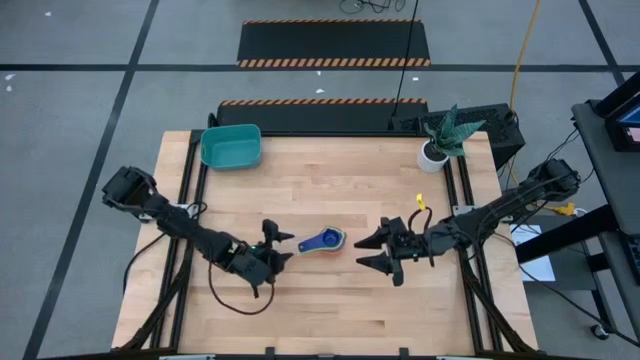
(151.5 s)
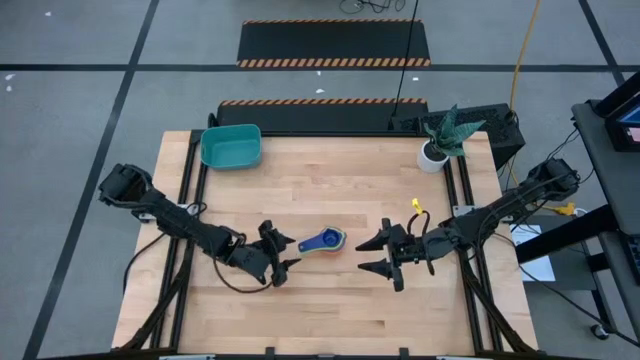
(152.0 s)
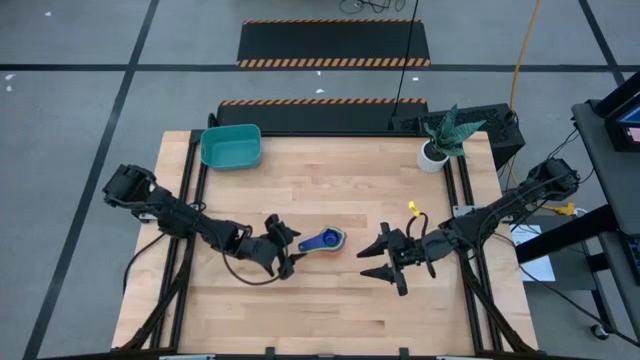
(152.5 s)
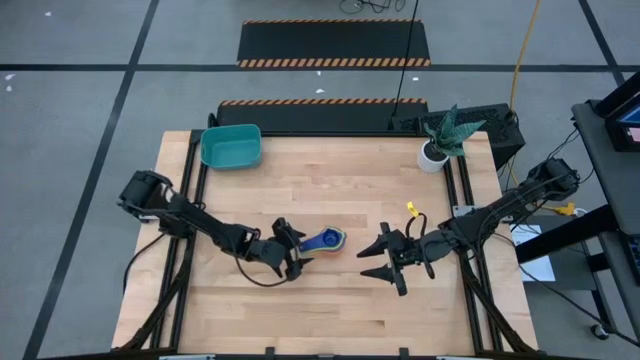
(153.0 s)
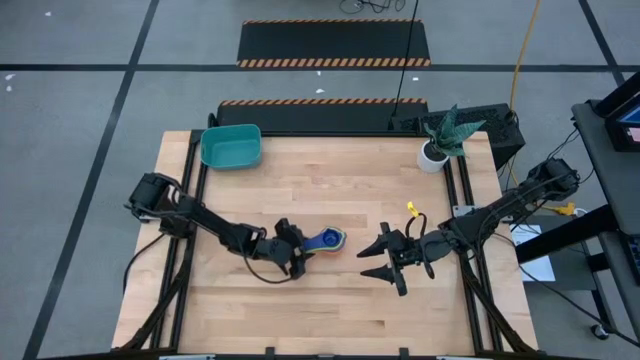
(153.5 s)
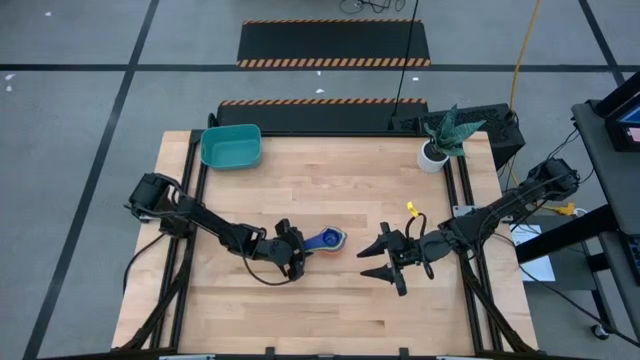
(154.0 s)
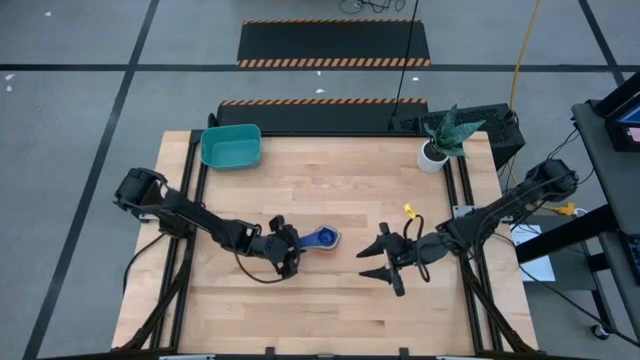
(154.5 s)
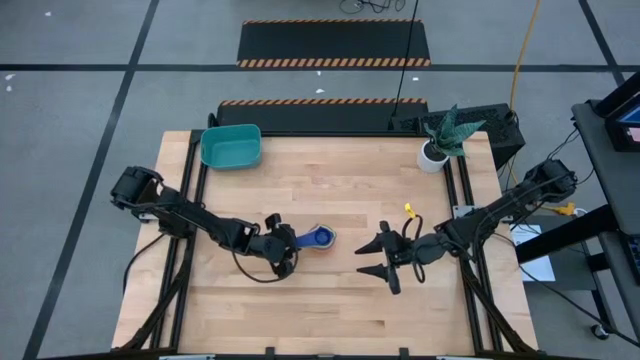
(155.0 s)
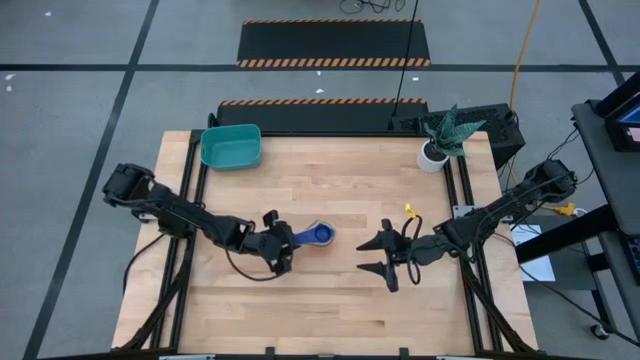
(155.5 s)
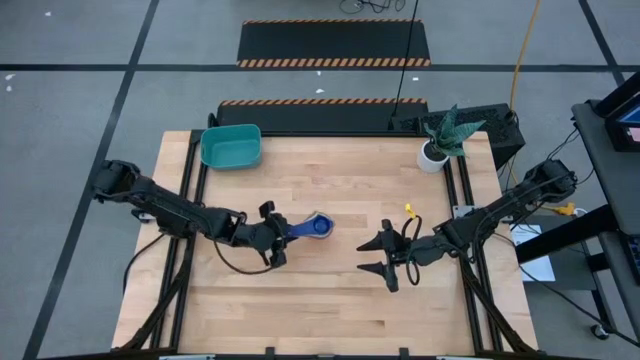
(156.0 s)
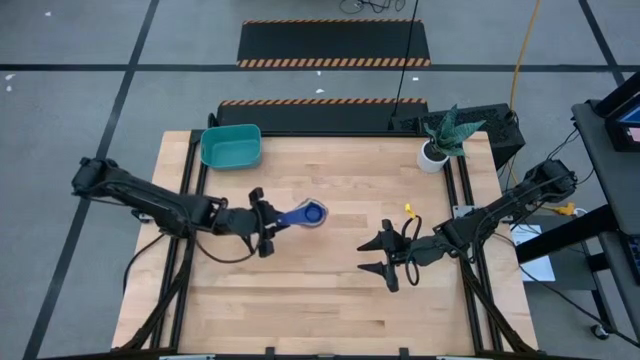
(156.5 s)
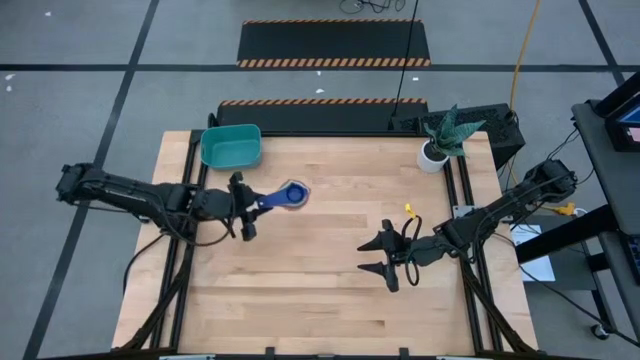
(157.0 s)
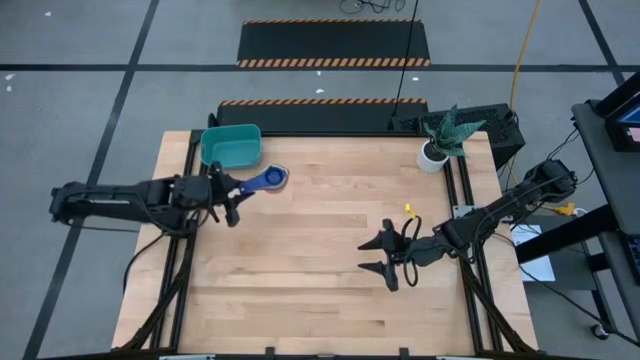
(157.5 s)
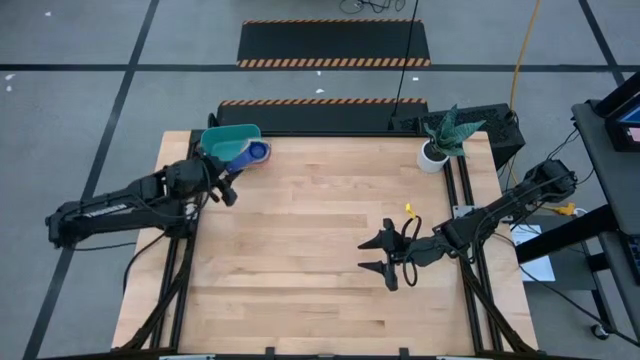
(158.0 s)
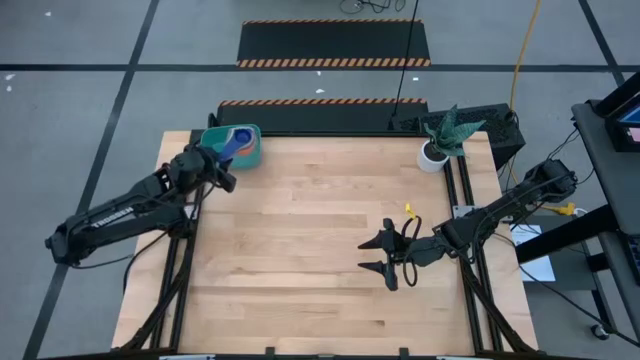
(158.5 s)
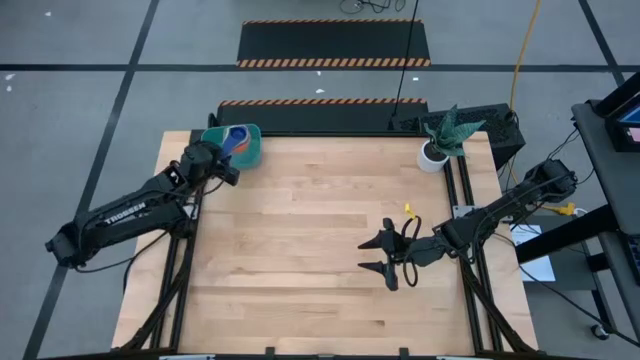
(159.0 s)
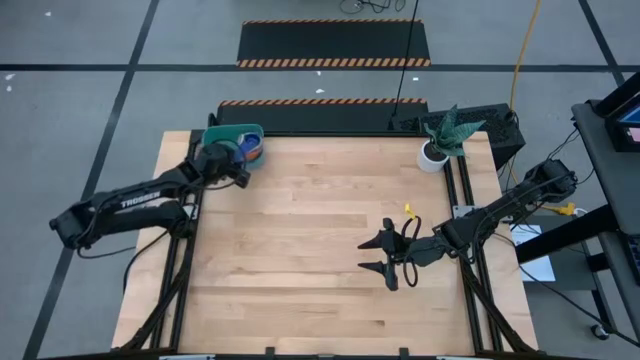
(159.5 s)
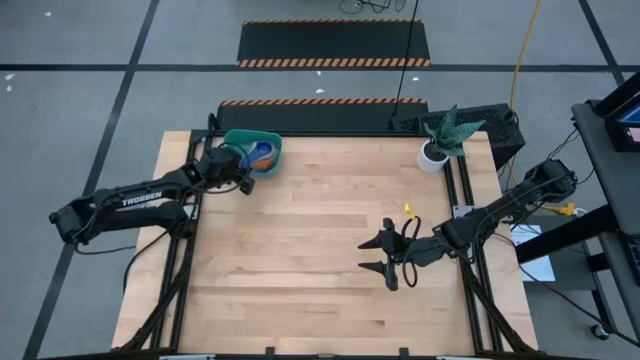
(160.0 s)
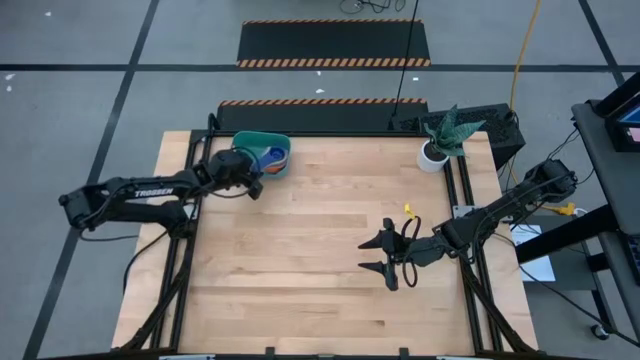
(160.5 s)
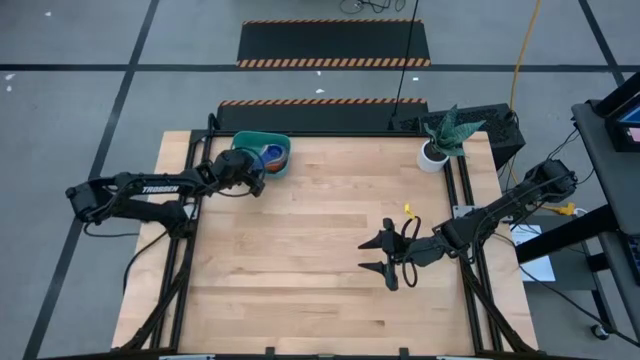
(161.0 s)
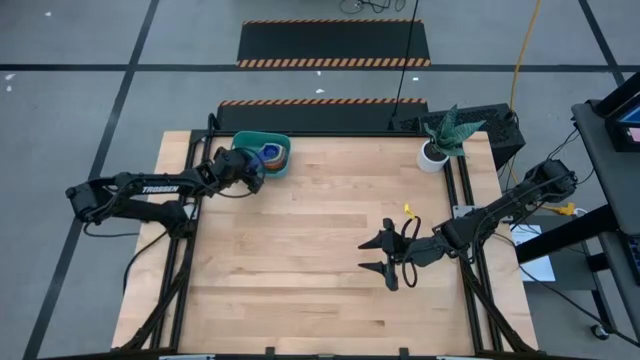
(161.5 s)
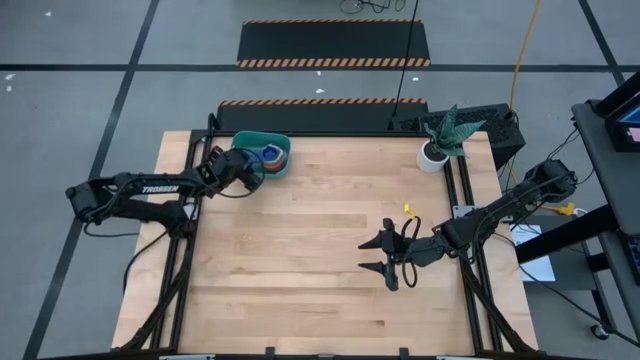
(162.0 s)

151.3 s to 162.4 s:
Task: Nest measuring cups in basket
Put the nested measuring cups into the green bin

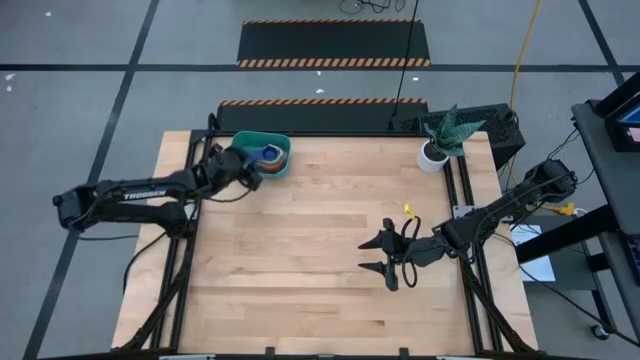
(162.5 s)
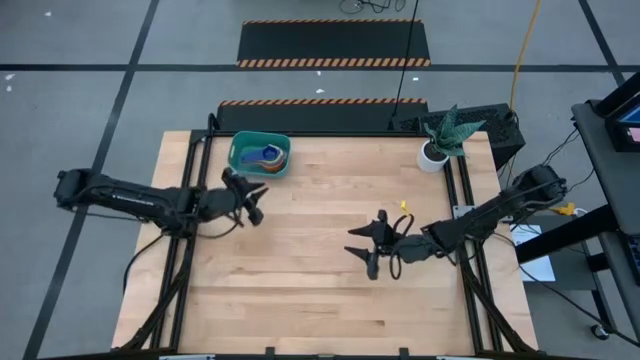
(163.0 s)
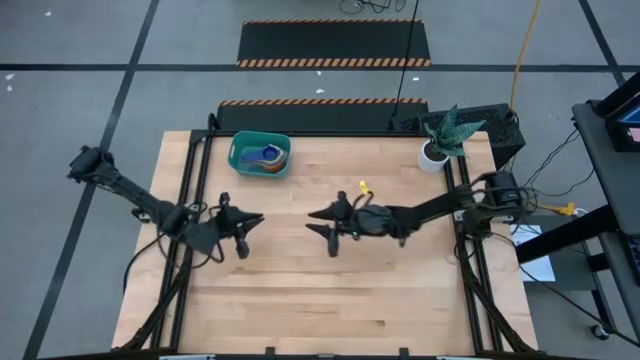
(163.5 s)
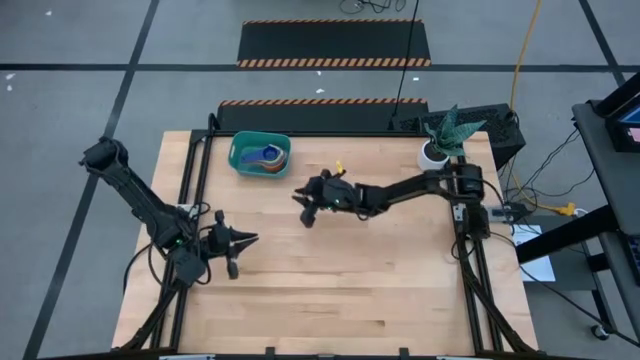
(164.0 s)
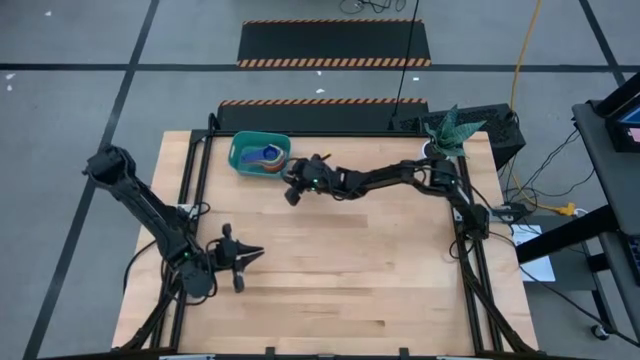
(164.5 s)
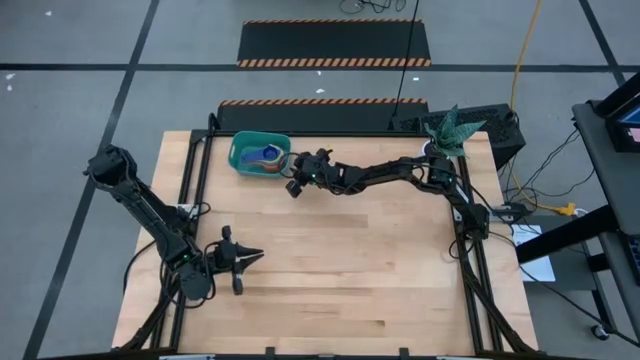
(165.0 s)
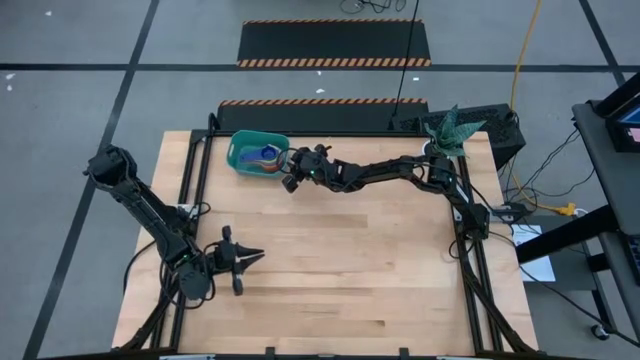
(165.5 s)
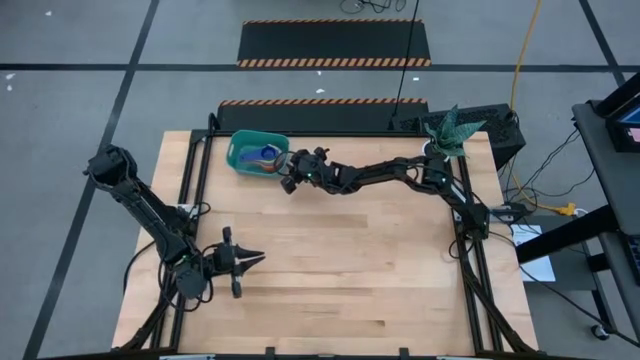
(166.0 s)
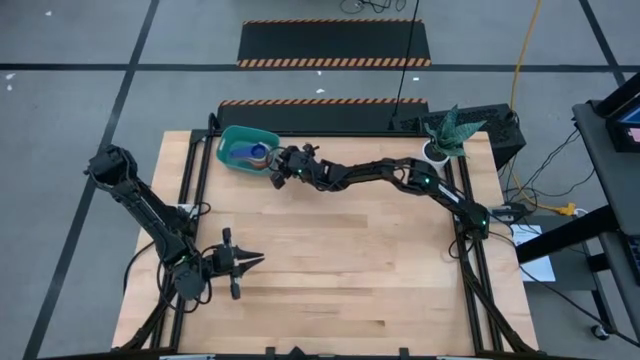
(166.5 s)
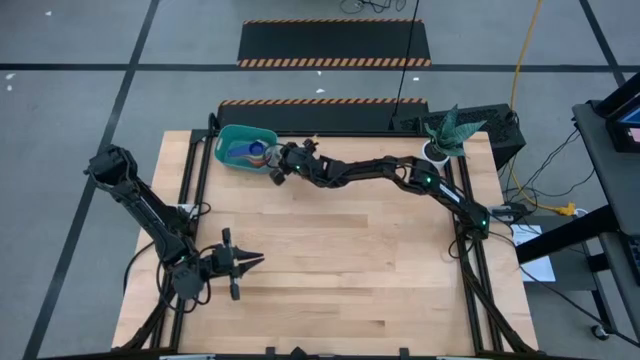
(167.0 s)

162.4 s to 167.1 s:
Adjust the green bin

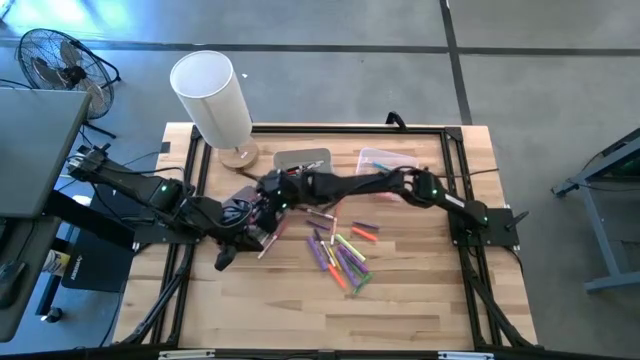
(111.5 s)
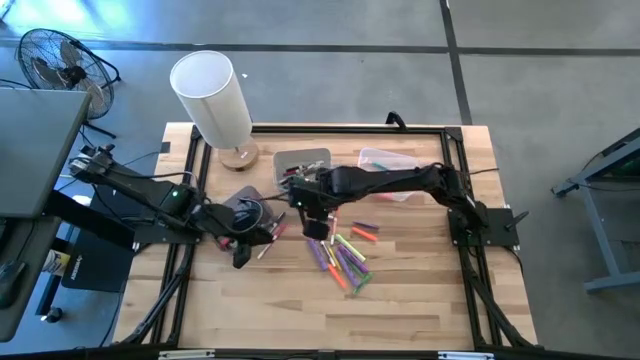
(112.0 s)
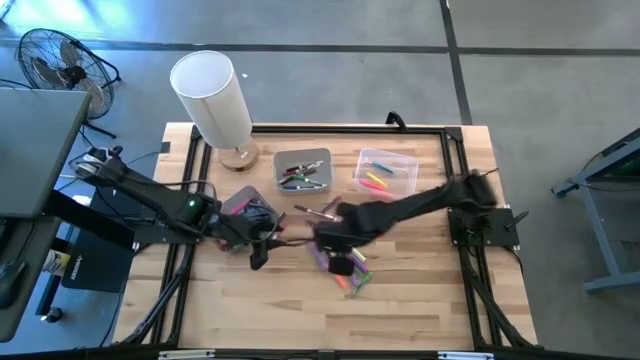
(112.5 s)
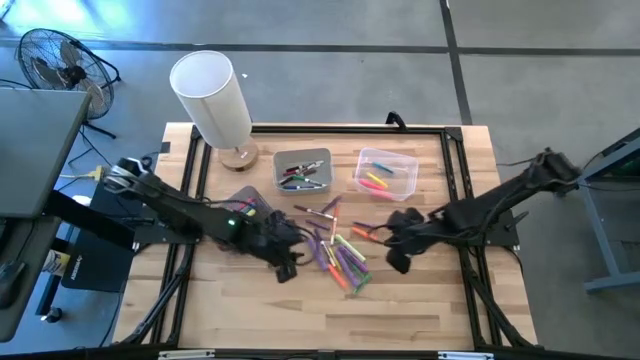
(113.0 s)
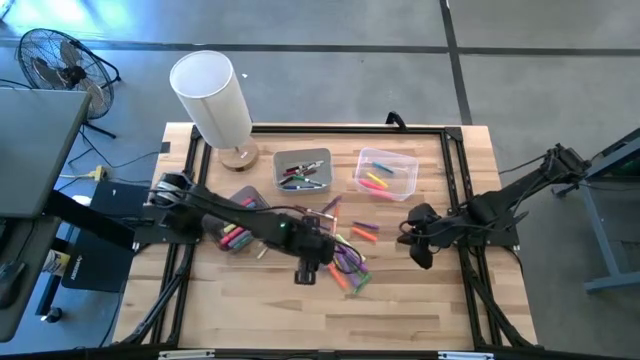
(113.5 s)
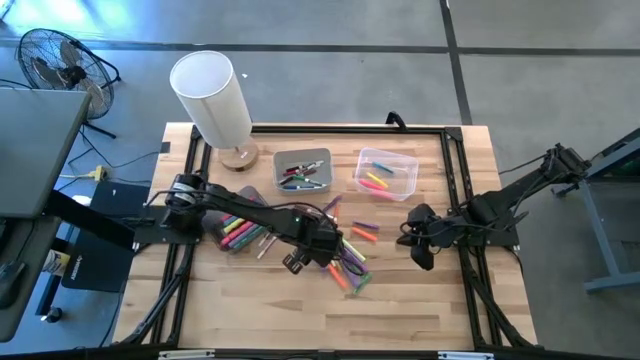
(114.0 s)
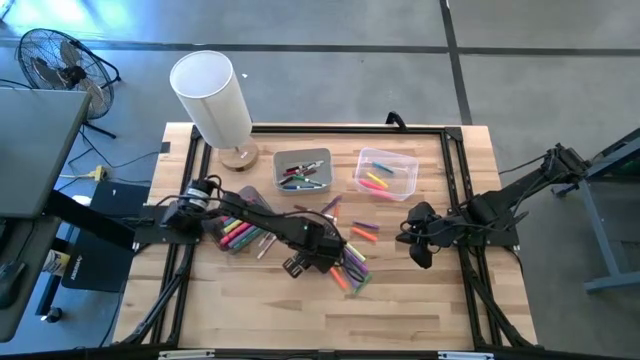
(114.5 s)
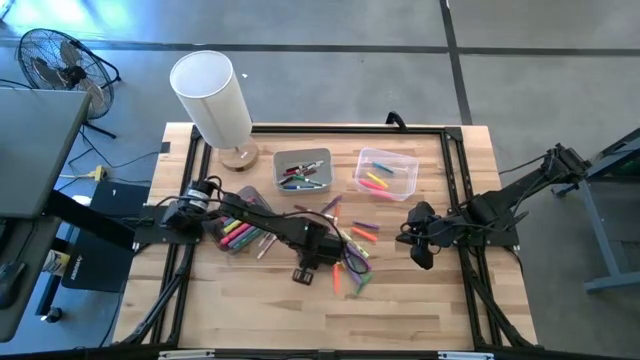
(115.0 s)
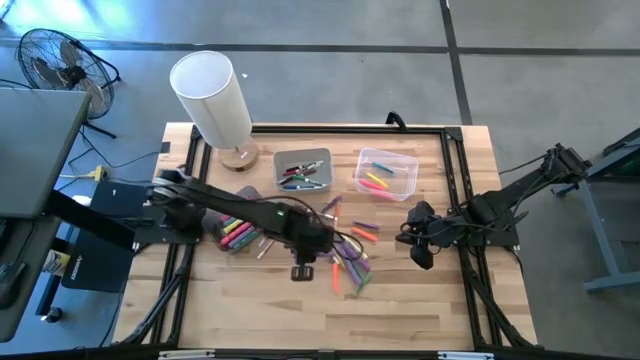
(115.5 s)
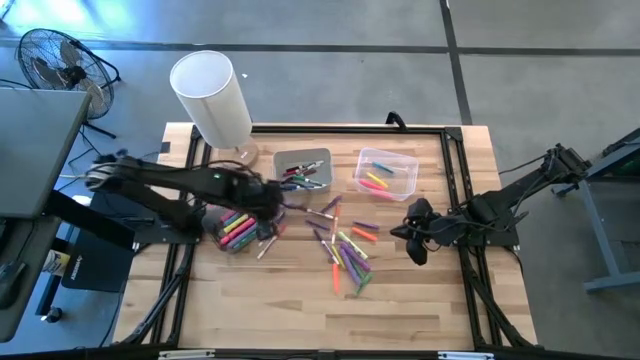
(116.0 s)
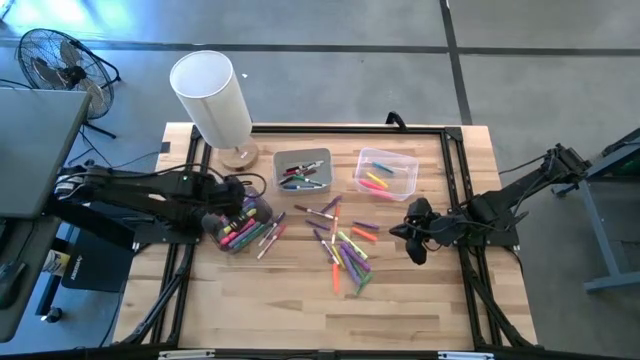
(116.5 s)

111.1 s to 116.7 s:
Task: Pick & Place Markers
Put the purple highlighter pen into the black bin

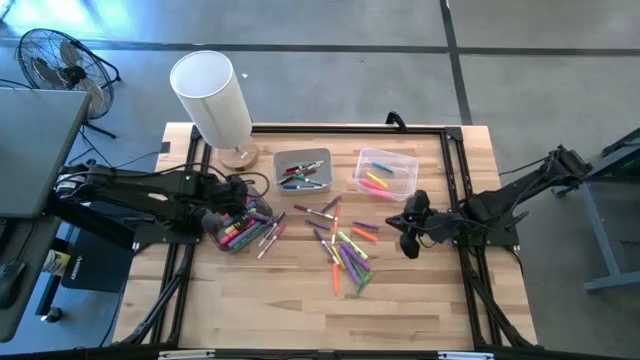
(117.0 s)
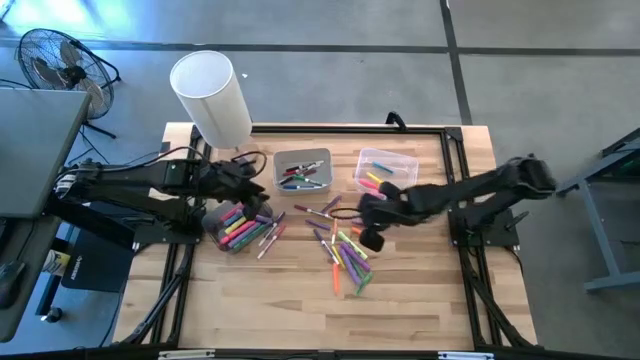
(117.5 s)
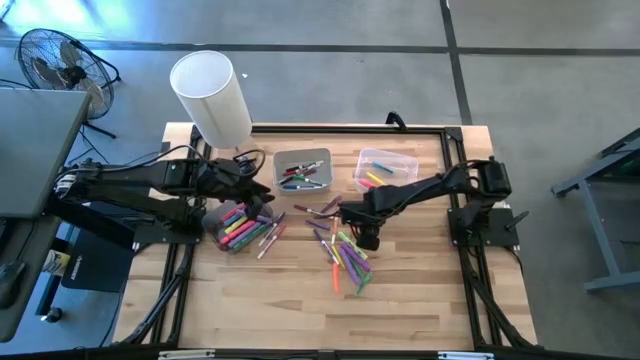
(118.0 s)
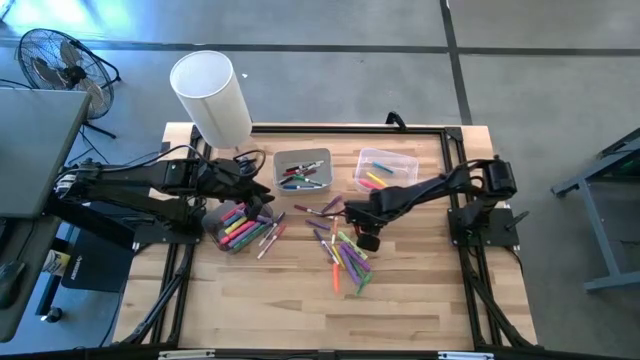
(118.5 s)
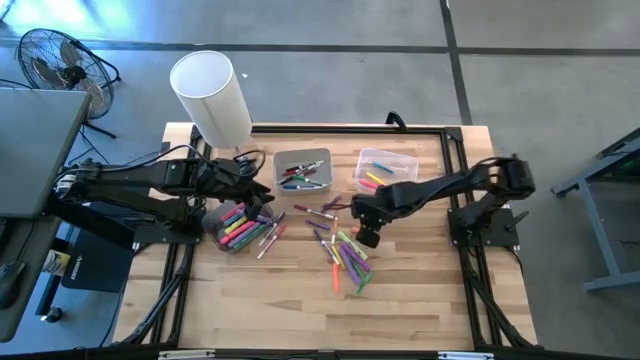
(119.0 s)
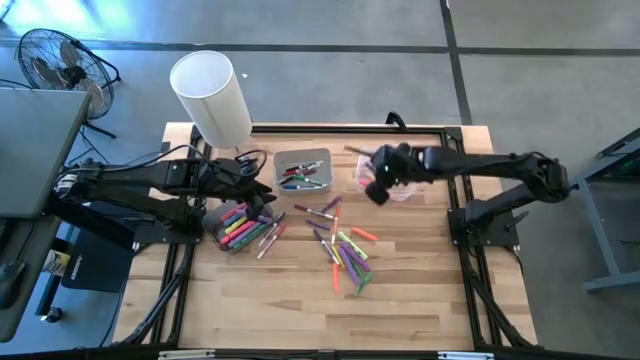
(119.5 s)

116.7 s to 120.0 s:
Put the purple pen into the transparent bin
